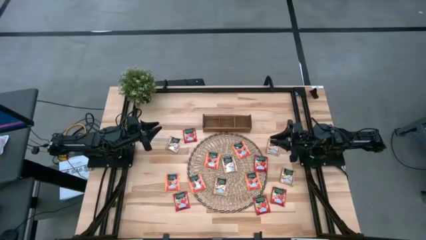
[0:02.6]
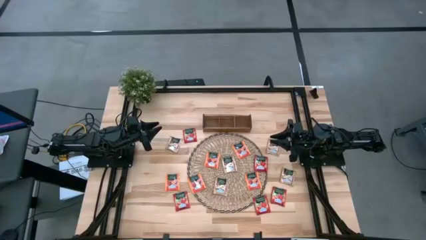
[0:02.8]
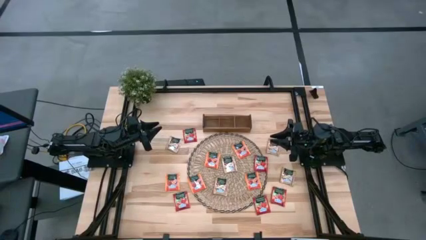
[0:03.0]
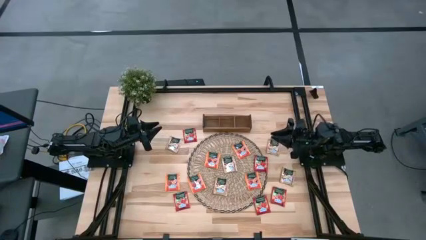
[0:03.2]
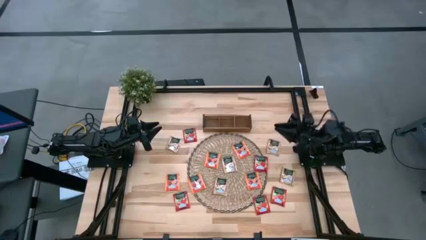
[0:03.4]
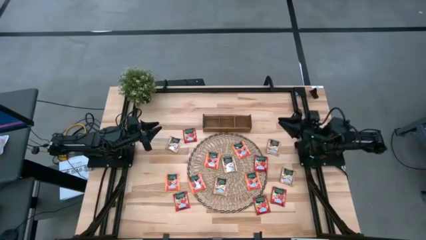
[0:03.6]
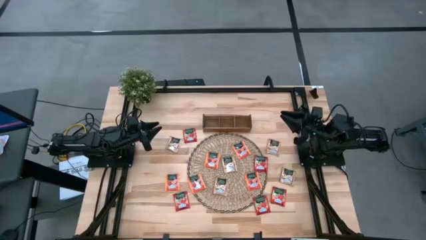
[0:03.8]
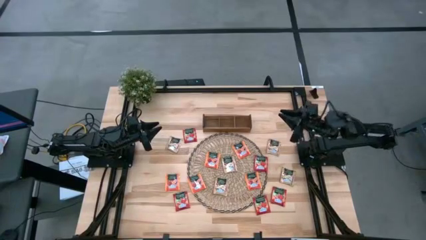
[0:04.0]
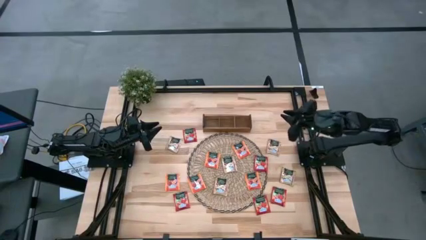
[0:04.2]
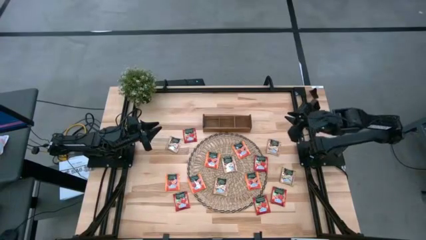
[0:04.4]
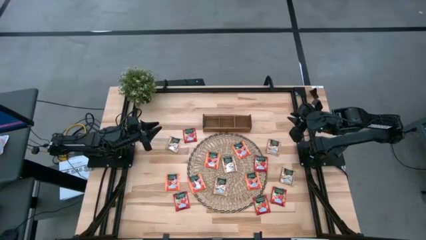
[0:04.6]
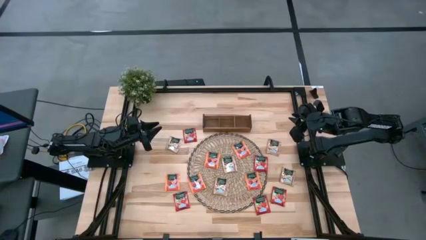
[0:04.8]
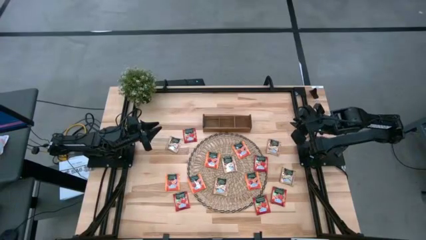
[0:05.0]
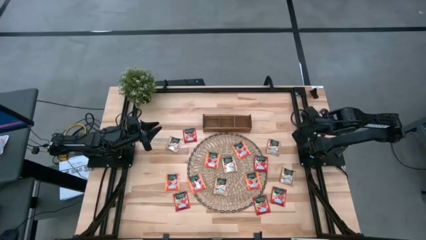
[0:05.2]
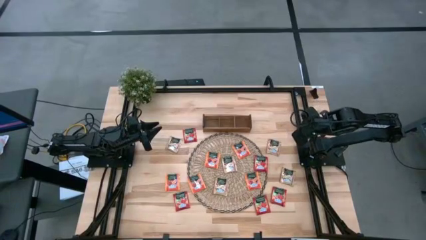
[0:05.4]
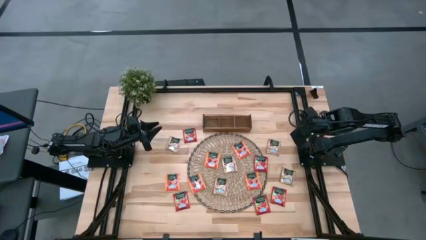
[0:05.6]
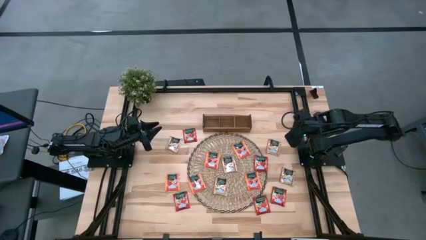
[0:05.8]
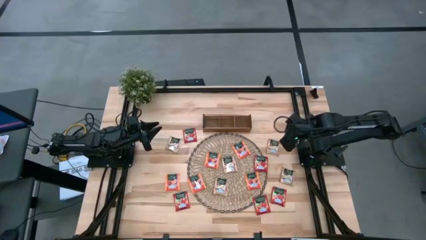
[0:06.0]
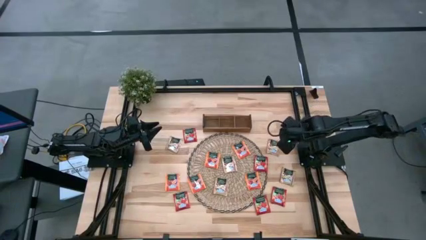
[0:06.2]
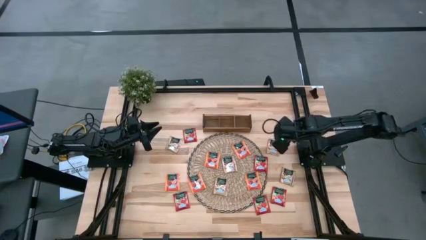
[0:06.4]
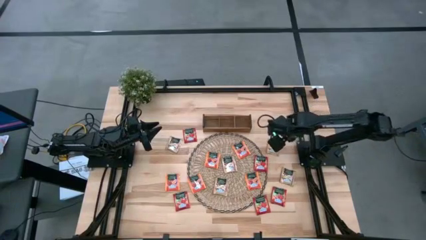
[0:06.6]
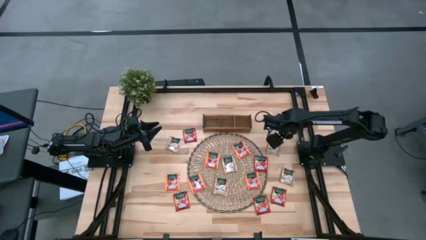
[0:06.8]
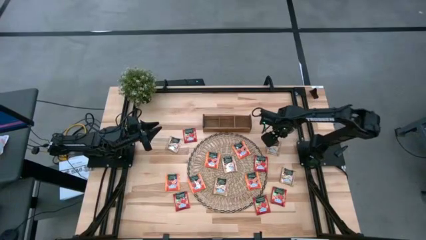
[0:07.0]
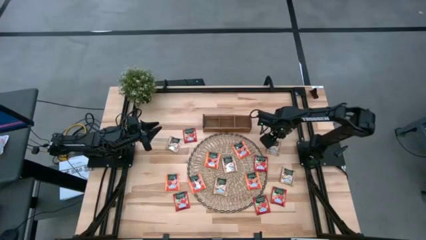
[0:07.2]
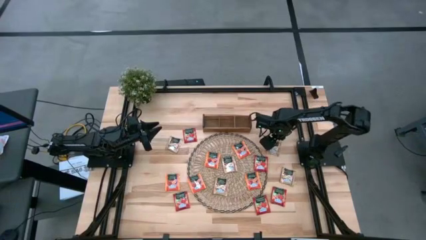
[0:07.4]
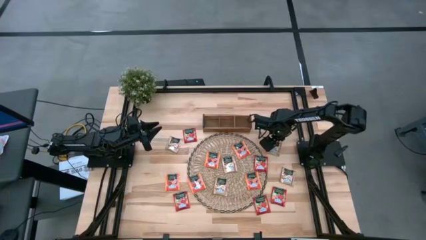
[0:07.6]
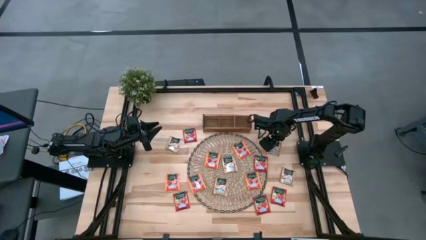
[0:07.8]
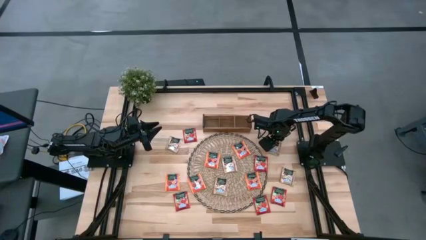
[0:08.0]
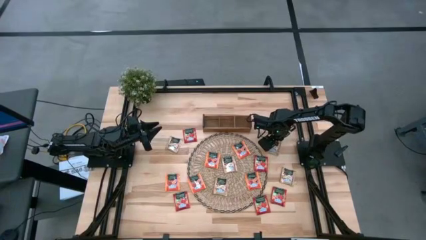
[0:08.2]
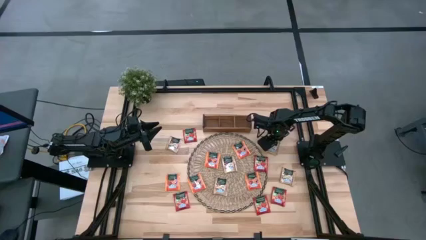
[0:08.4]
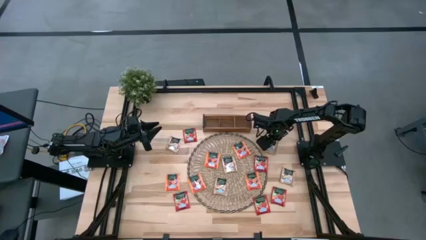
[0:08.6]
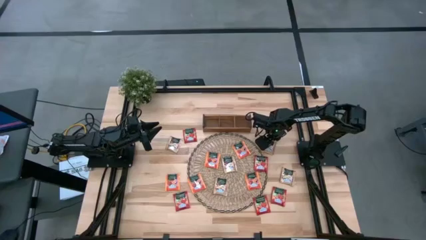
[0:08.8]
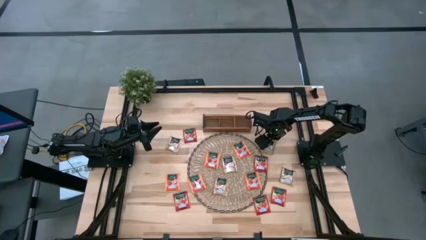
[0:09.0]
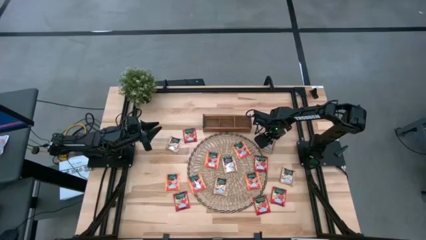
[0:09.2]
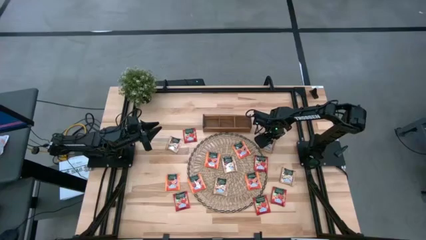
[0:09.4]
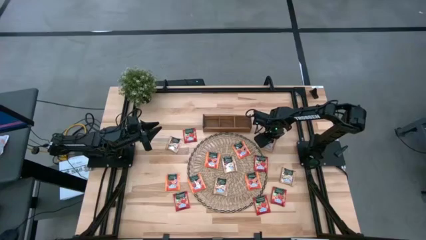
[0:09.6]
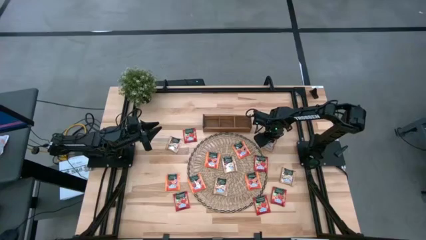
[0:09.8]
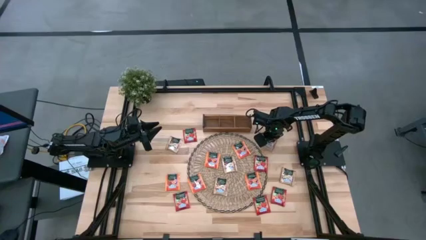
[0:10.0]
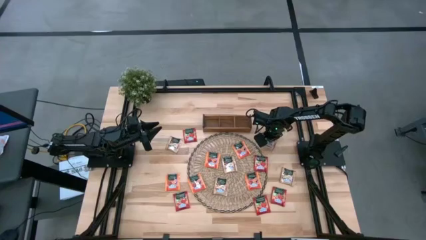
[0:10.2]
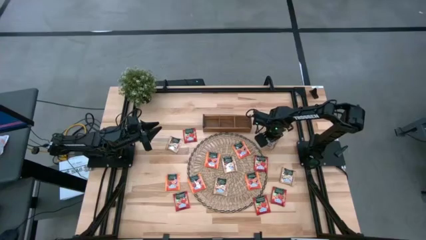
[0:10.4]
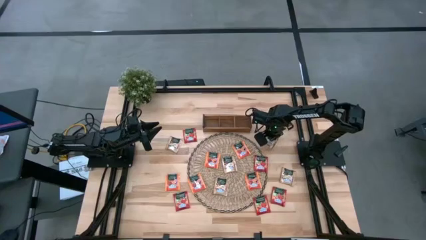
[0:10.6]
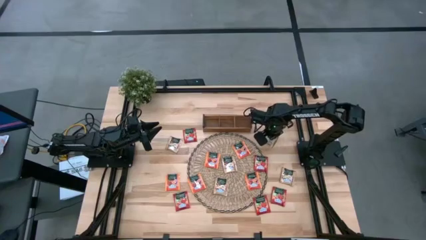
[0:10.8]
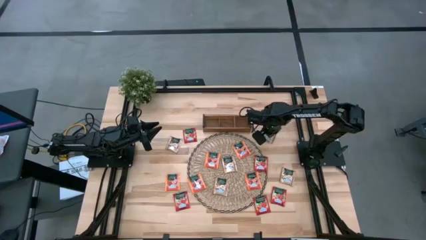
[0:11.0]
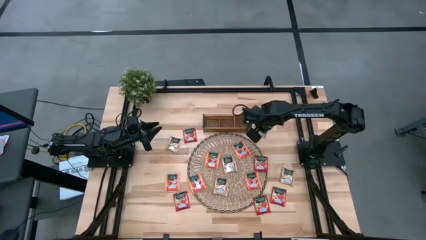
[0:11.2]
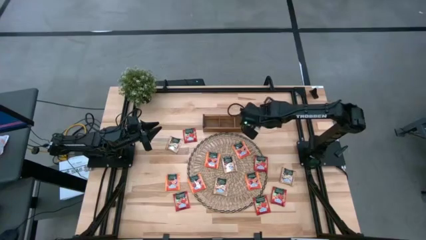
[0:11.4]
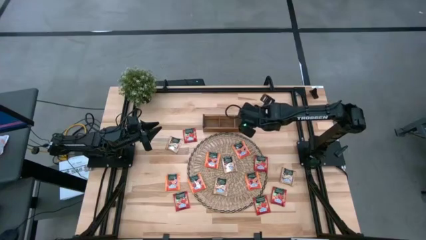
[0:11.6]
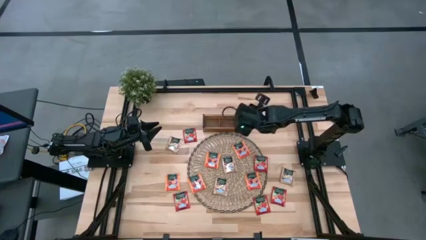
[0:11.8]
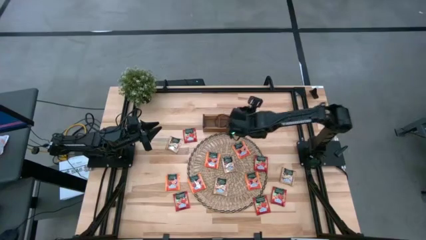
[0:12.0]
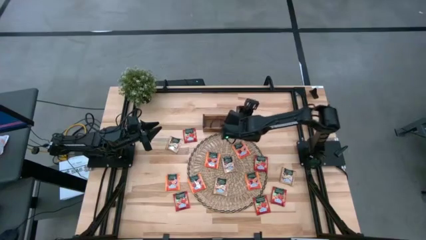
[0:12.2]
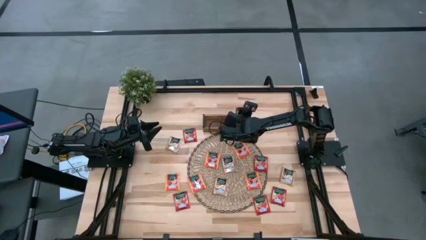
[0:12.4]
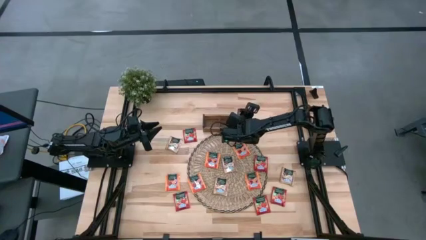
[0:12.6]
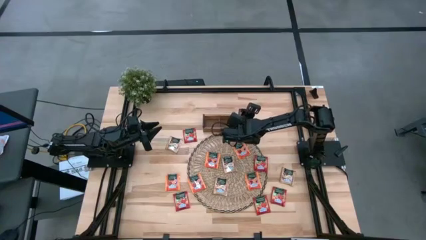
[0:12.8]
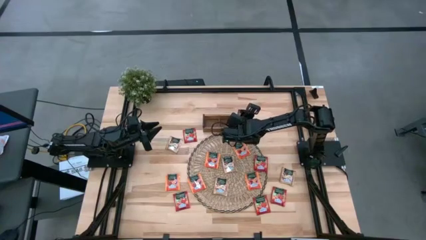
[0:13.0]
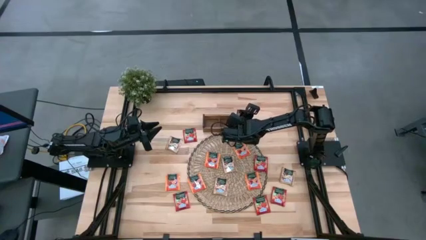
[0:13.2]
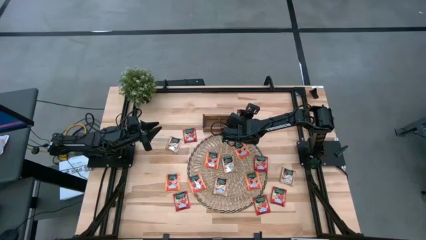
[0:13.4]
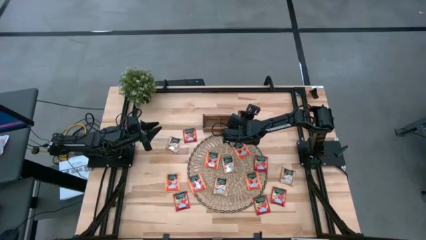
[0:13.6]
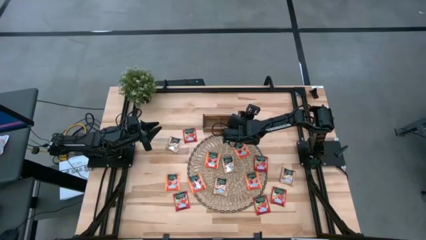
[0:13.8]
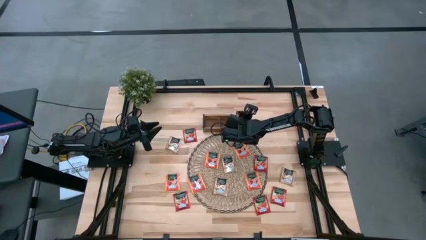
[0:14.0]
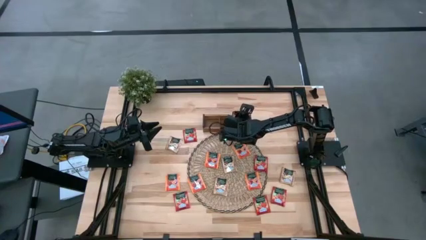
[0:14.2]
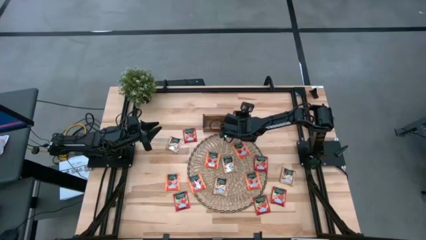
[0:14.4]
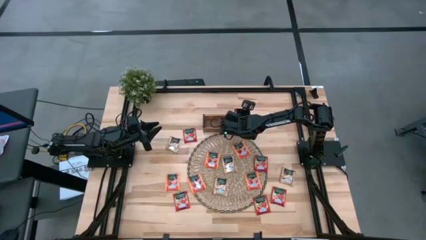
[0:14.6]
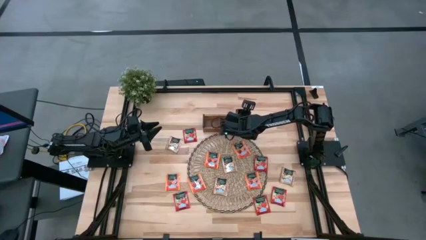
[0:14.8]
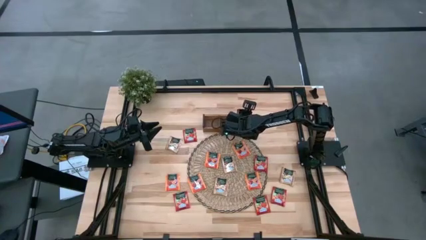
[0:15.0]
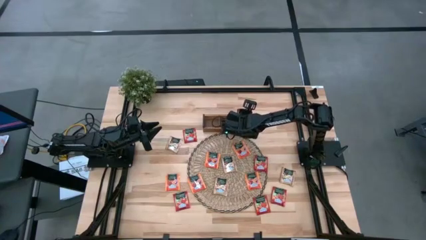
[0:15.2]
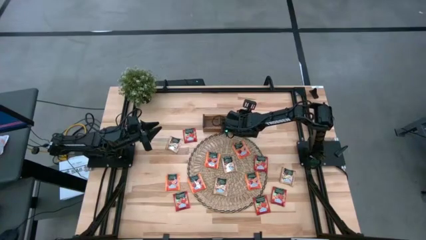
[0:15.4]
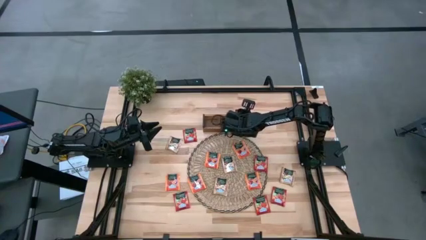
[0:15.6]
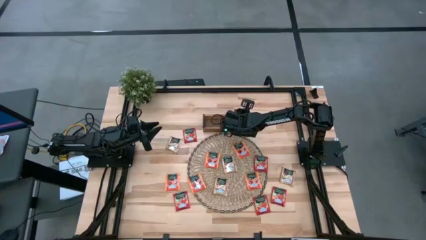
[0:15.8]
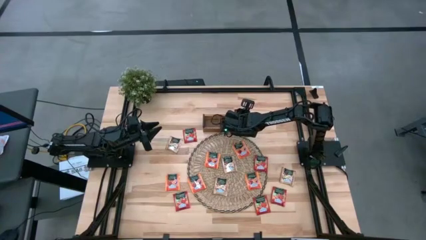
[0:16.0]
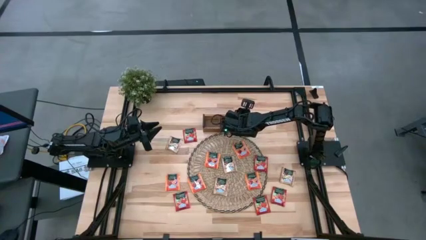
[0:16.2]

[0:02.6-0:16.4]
Task: Pick & Place Tea
Put the brown tea bag into the right section of the wooden organizer
